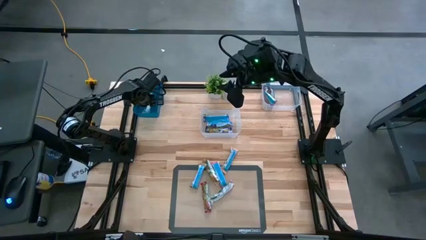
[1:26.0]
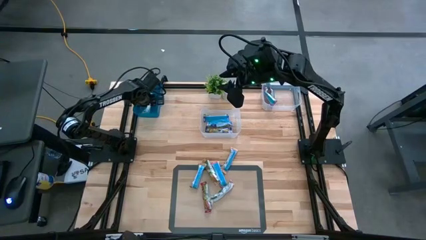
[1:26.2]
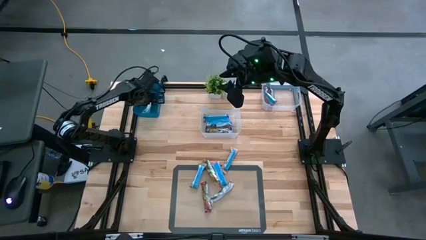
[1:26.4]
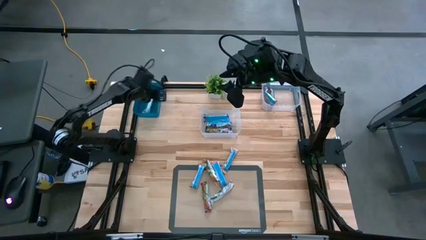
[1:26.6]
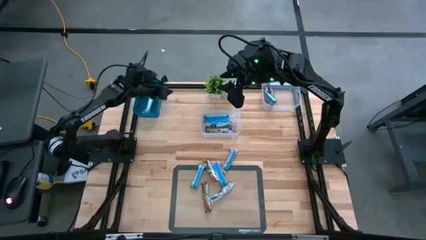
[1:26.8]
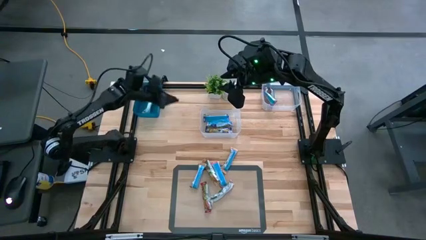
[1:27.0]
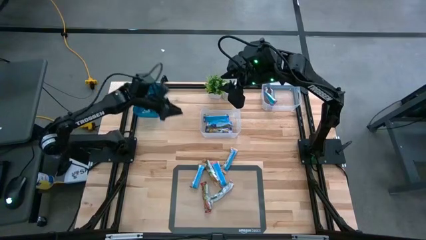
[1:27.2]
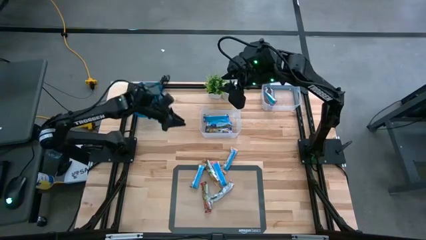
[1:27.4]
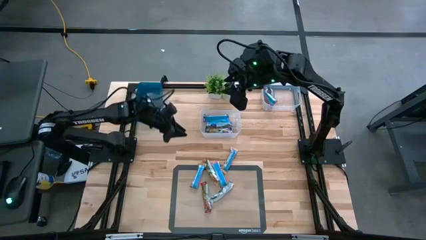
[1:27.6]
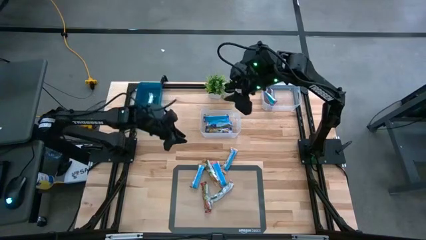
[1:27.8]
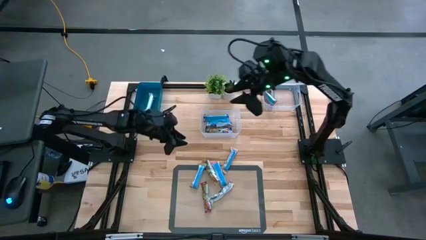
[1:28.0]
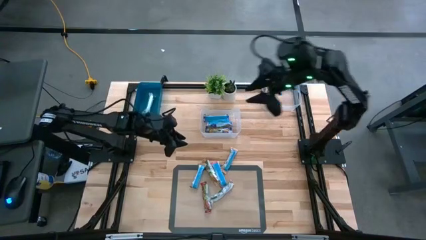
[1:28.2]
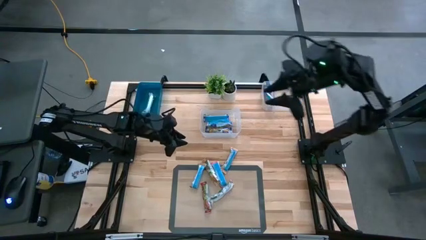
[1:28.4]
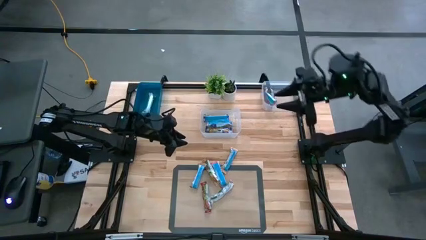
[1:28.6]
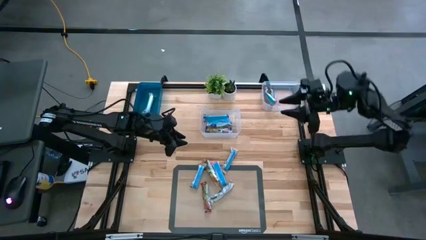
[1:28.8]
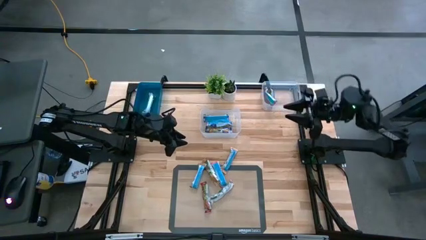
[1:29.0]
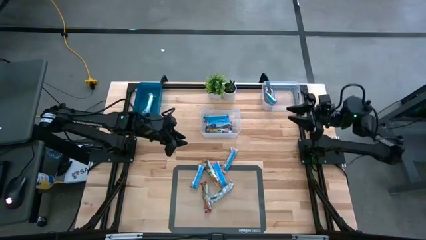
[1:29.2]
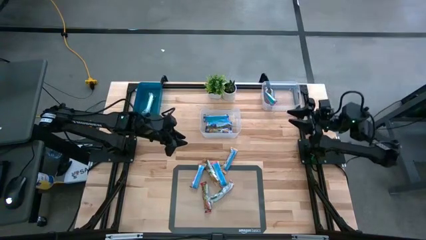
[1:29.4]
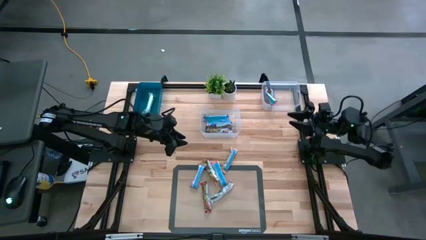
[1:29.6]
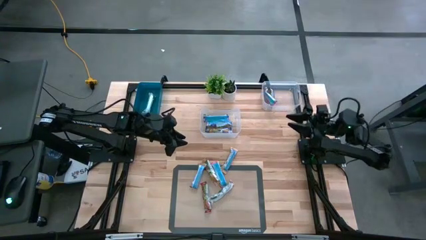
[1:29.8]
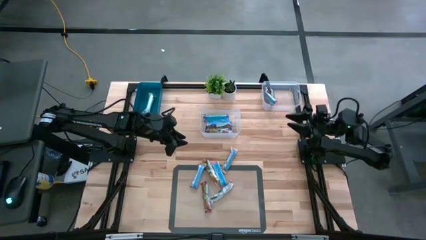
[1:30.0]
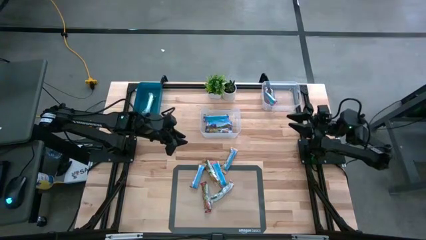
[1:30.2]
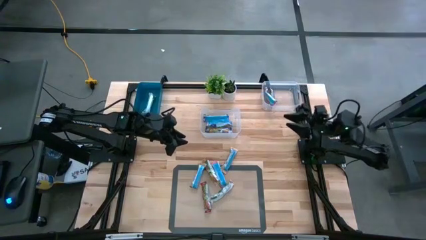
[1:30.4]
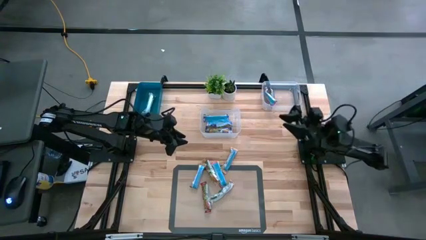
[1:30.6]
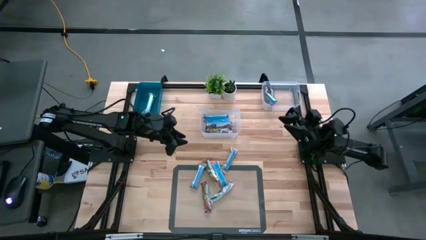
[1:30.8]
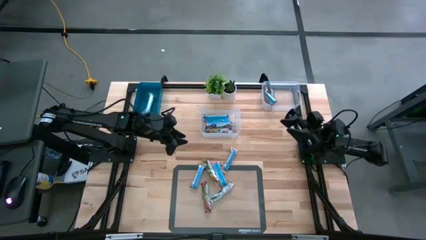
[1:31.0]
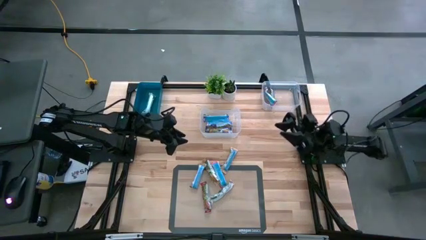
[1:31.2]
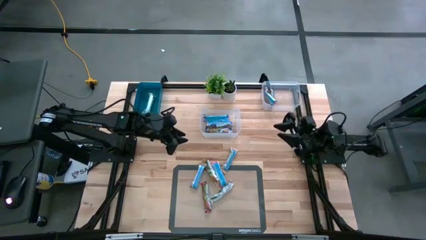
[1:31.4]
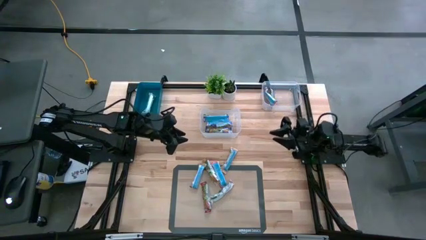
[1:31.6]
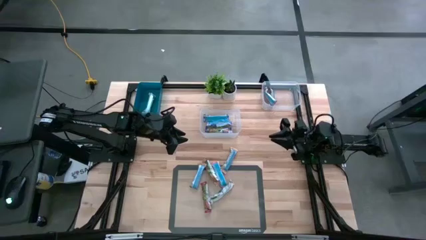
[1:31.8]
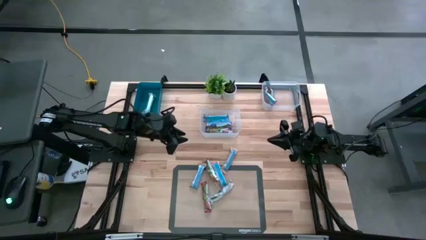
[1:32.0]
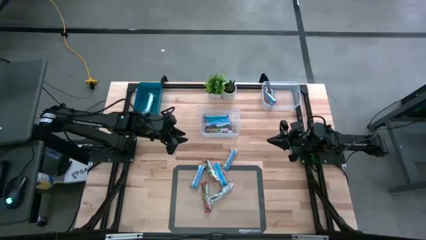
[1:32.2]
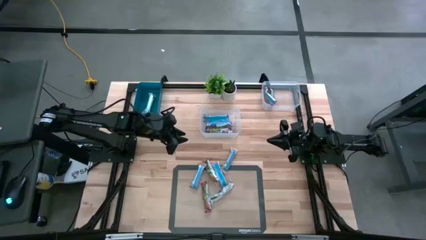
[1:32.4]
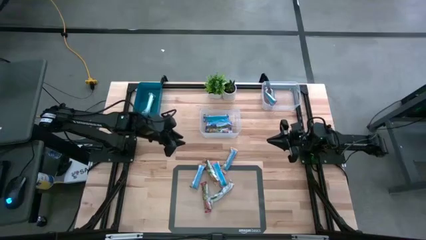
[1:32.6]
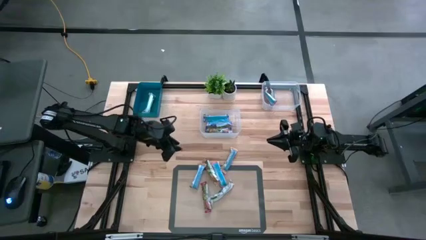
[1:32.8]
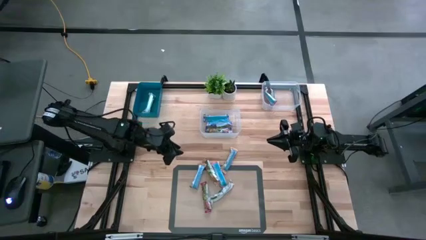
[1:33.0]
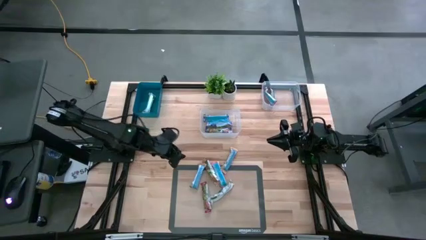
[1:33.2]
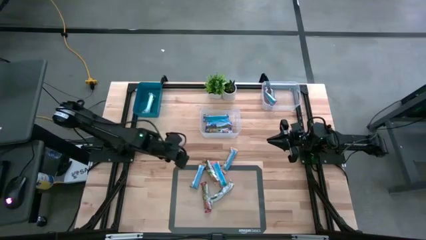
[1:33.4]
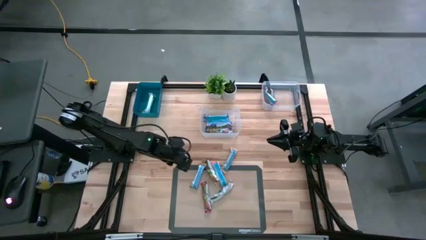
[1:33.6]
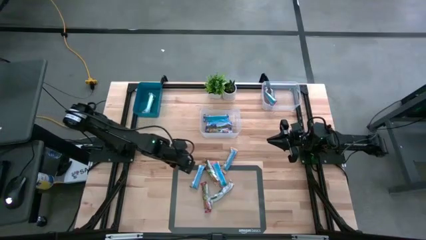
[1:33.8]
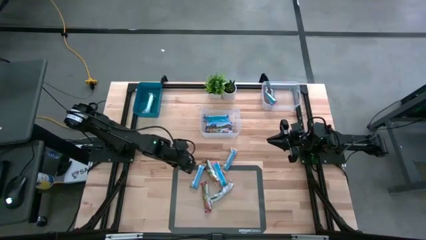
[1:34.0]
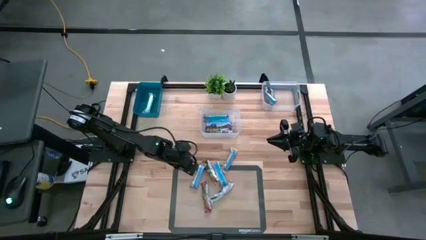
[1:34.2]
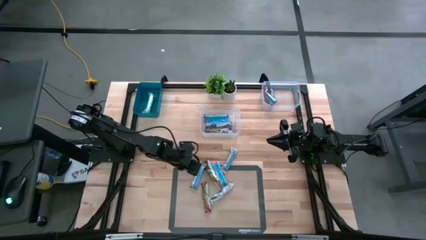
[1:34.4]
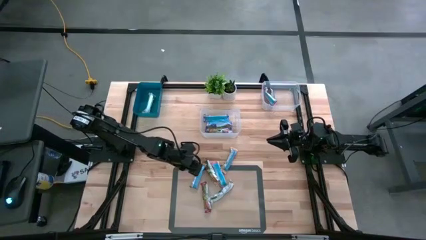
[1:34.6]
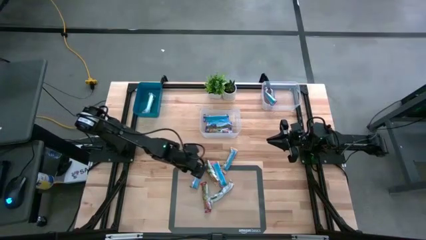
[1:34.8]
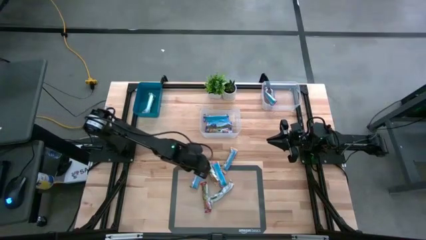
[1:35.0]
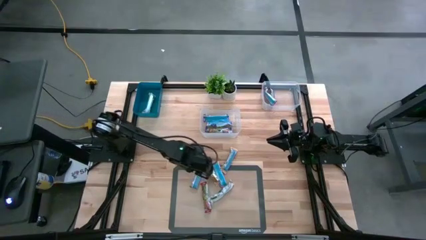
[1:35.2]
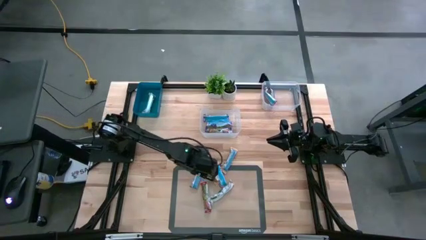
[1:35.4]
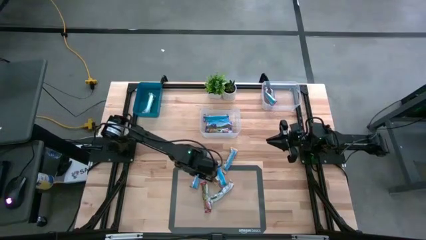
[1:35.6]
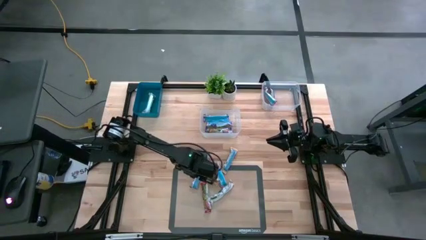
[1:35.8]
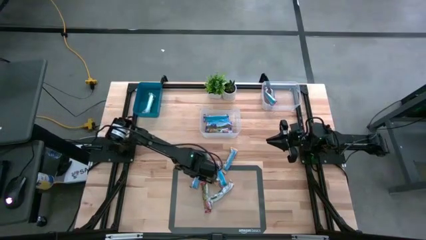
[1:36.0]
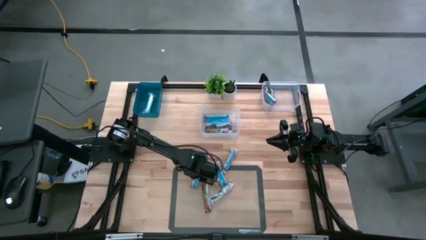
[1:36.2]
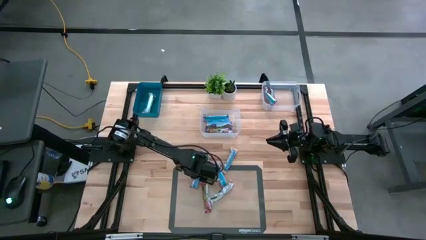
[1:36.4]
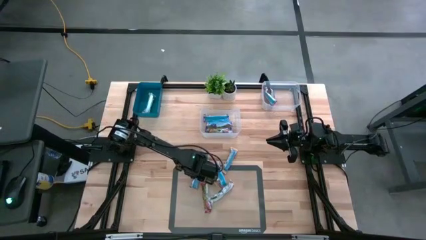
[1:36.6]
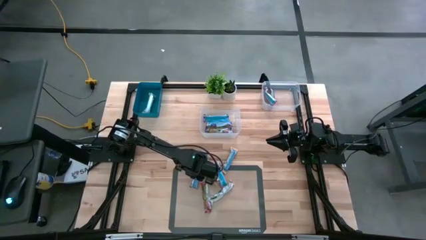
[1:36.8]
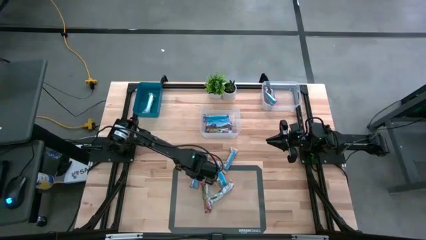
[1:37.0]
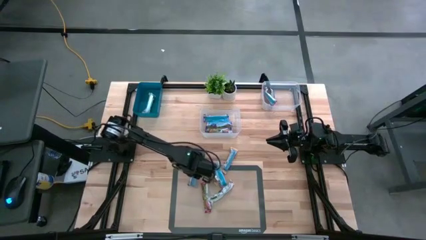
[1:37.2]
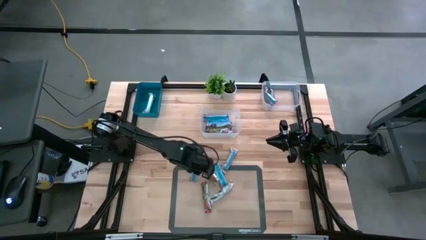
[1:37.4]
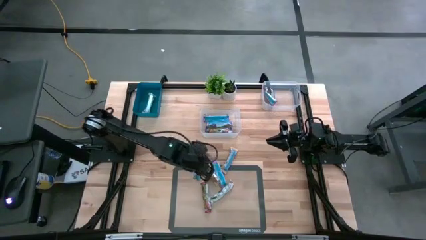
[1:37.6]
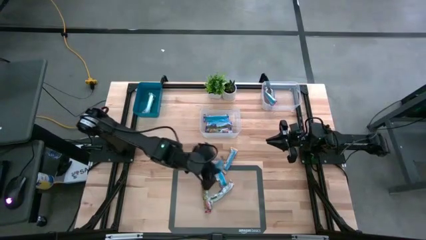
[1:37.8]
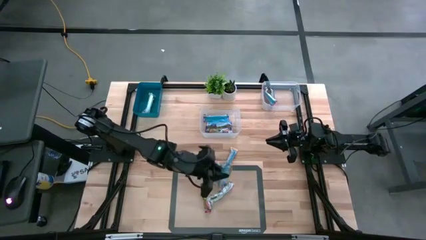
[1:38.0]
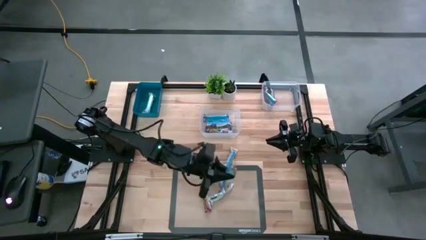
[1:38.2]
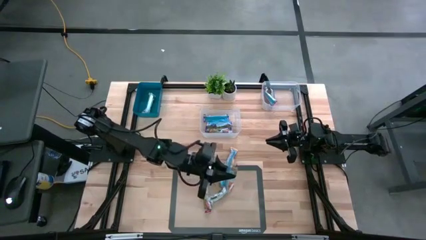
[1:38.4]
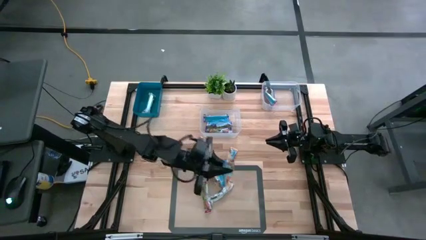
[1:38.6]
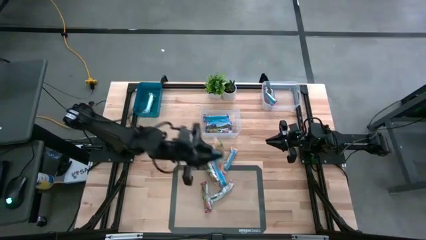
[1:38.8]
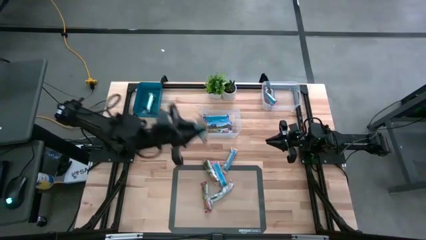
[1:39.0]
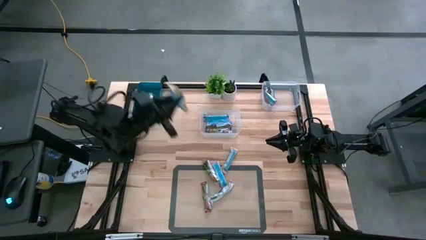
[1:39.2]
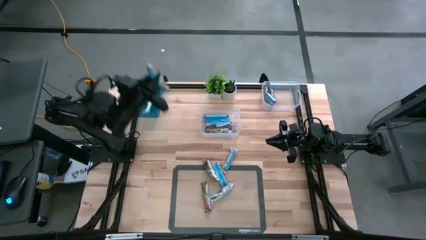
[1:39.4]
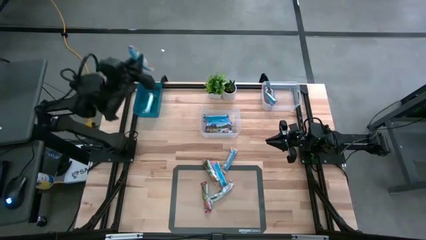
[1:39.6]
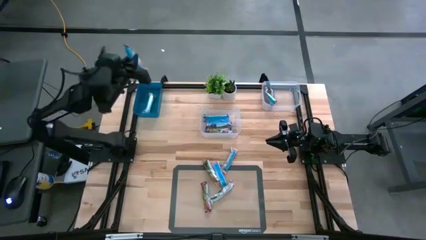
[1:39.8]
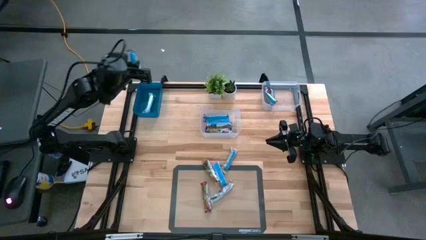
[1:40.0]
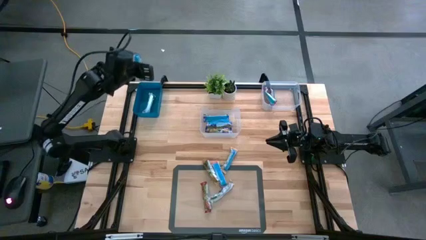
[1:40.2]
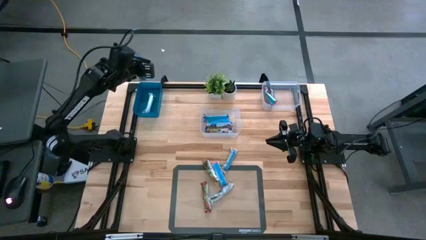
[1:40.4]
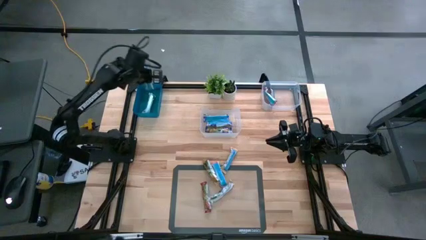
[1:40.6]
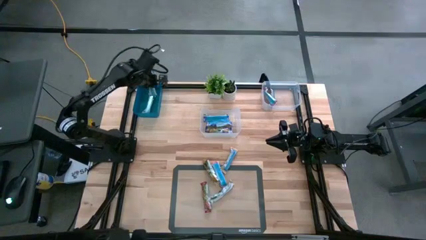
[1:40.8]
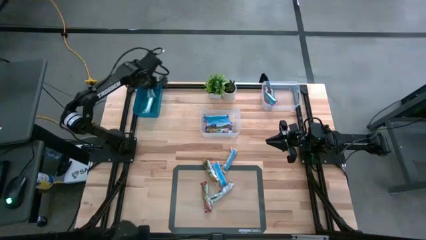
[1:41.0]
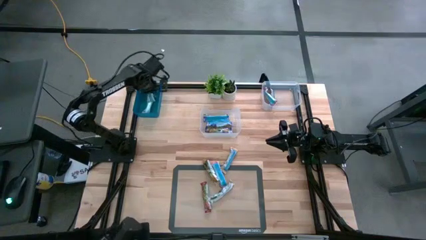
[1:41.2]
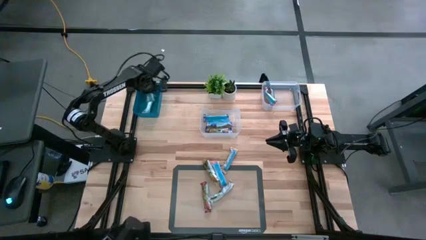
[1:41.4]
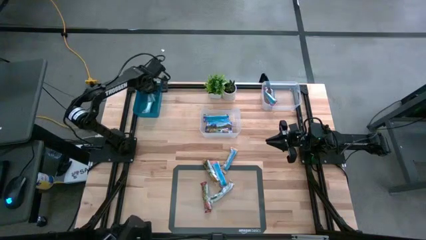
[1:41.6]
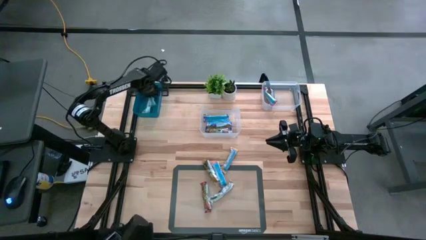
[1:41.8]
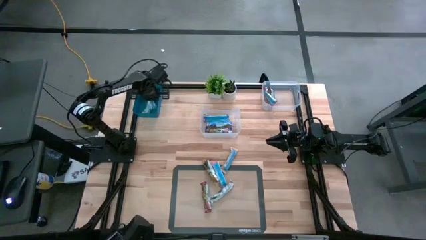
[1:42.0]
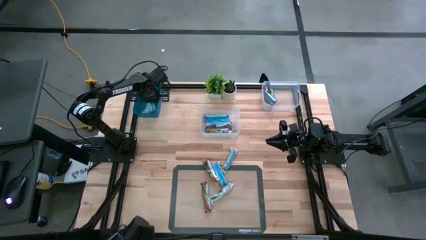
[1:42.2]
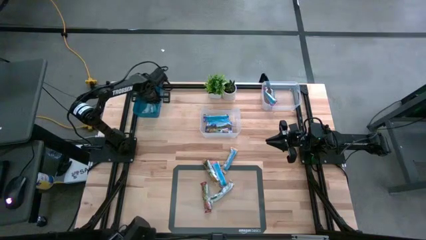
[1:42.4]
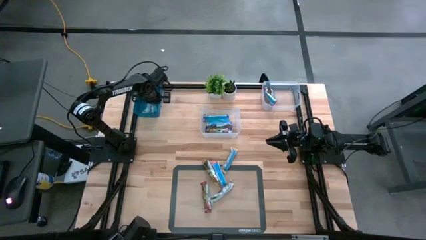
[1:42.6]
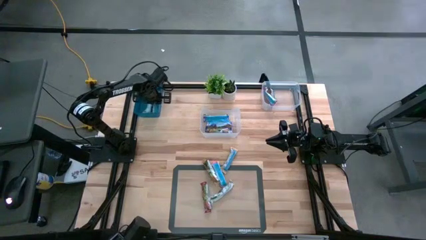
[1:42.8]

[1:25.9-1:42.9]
Task: Pick and place Granola Bars by type
Put the orange granola bar in the blue bin
